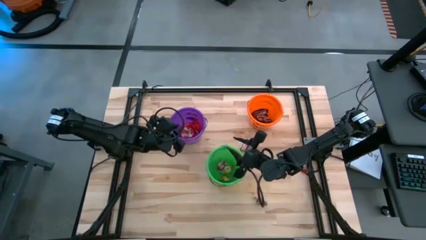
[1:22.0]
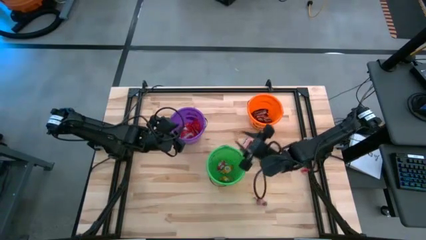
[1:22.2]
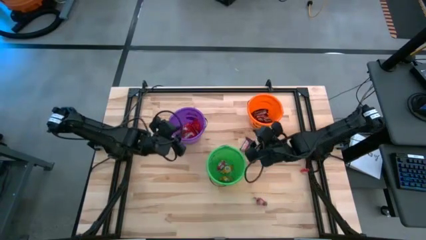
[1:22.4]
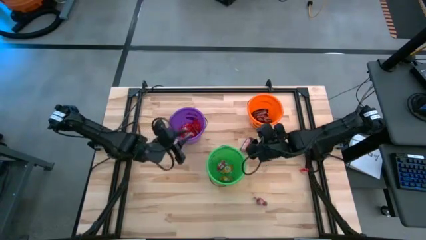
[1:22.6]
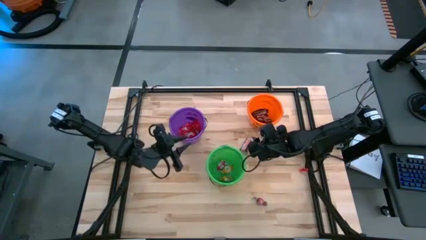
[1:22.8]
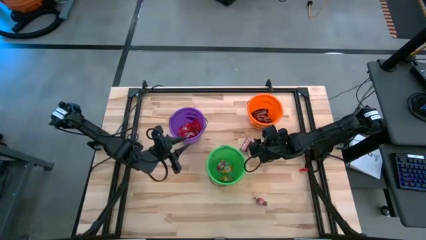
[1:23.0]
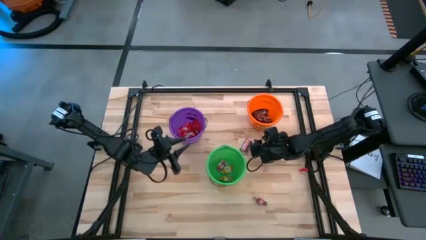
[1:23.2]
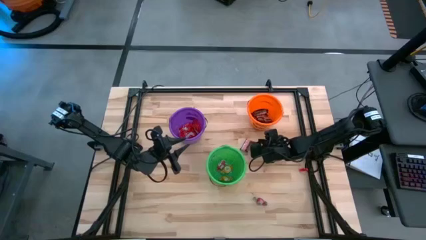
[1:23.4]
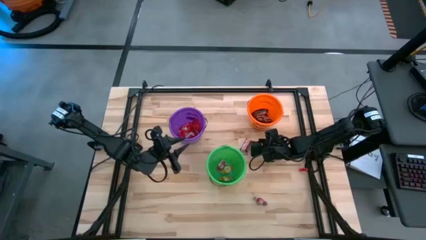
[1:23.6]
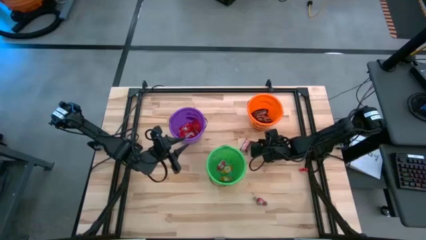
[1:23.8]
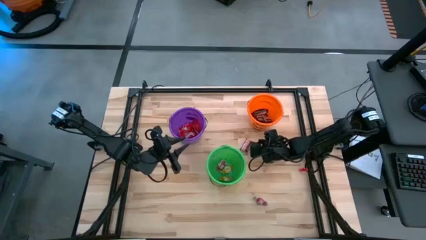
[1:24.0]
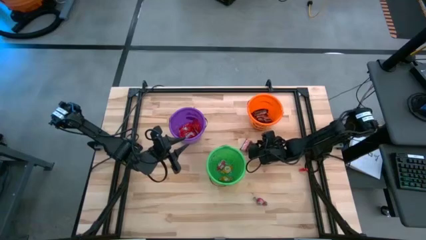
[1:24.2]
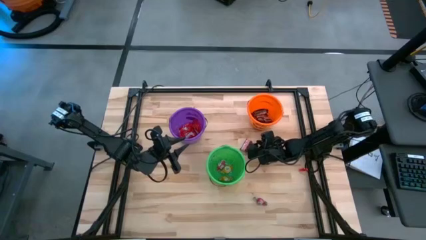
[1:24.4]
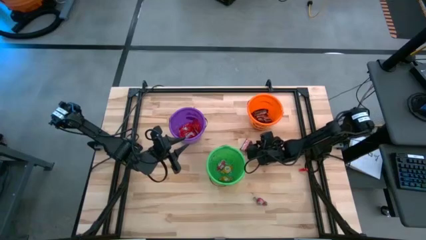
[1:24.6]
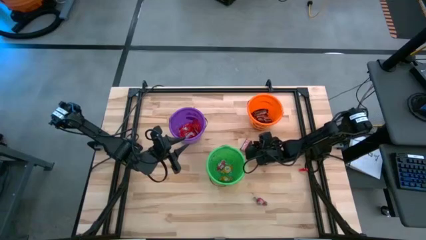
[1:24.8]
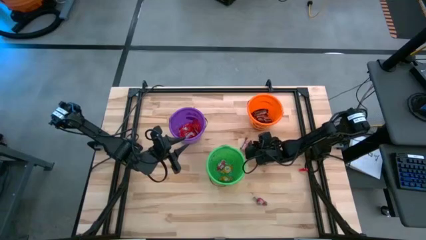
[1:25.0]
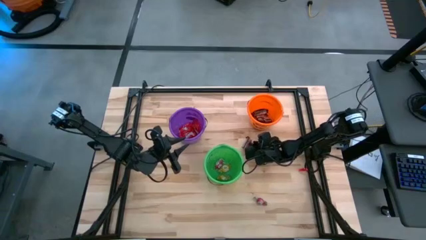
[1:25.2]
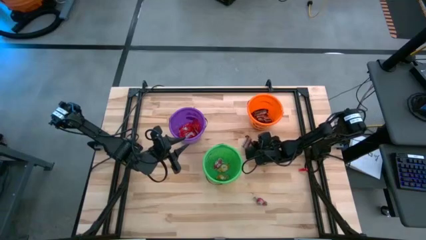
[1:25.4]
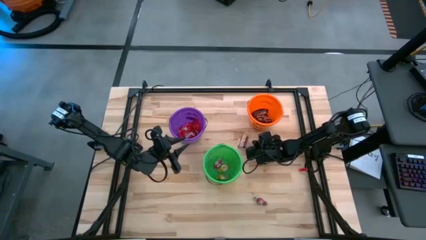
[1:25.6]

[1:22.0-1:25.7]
Task: Organize candy in baskets
Put the brown chocolate bar into the orange bucket

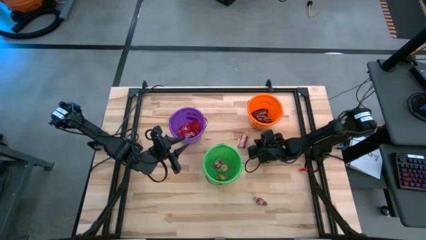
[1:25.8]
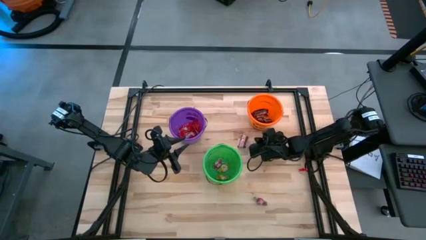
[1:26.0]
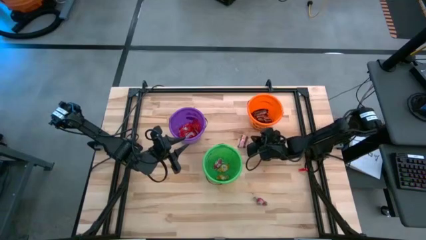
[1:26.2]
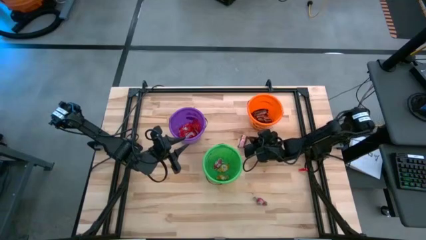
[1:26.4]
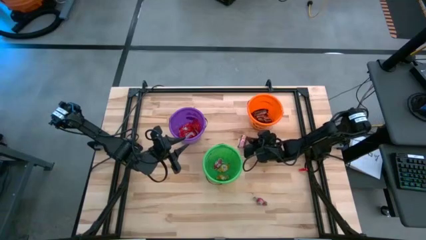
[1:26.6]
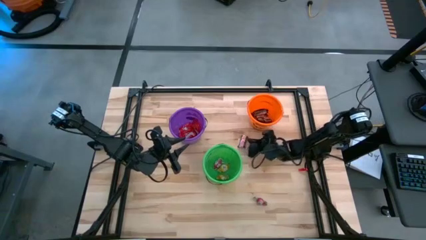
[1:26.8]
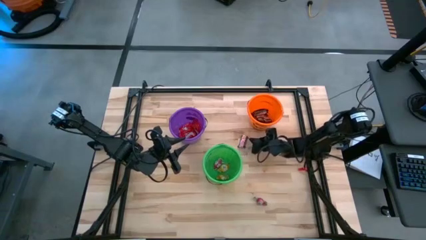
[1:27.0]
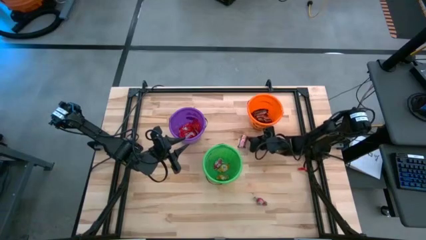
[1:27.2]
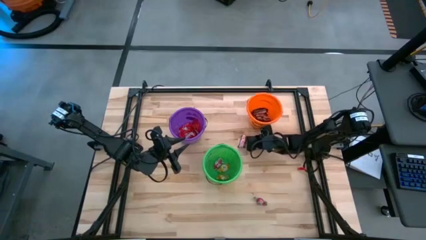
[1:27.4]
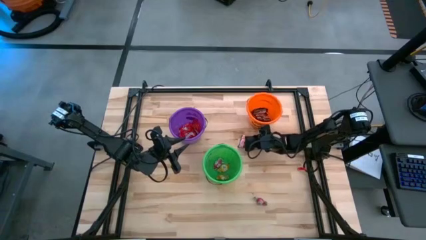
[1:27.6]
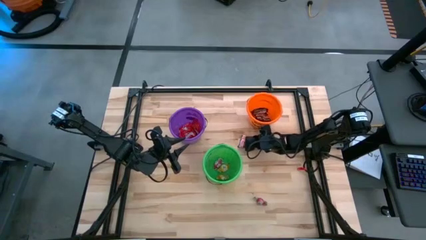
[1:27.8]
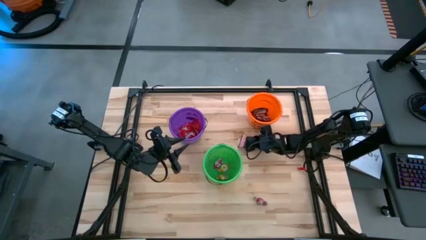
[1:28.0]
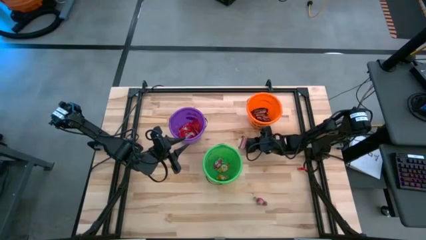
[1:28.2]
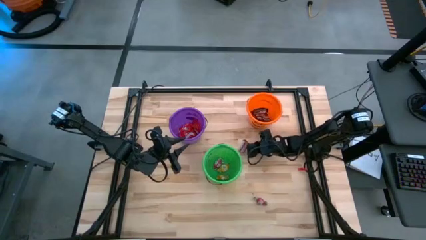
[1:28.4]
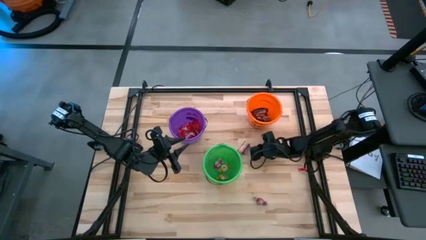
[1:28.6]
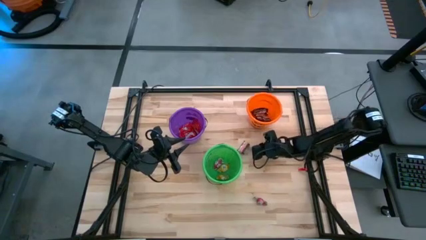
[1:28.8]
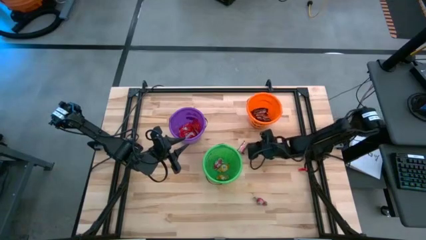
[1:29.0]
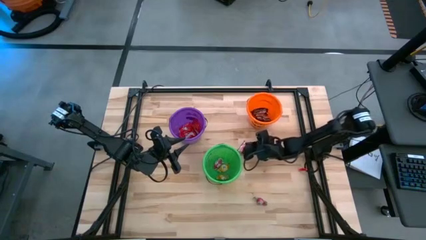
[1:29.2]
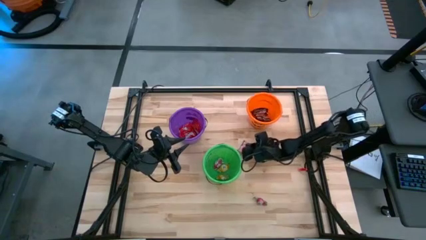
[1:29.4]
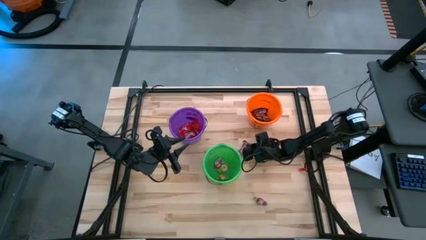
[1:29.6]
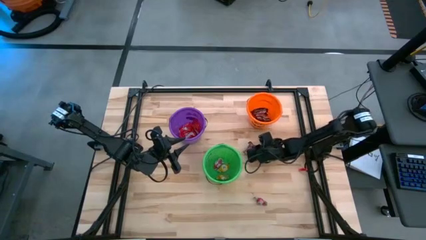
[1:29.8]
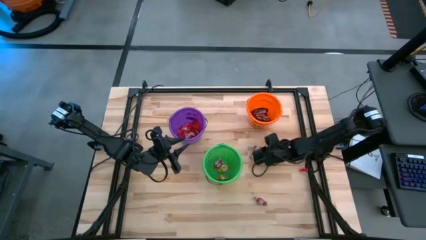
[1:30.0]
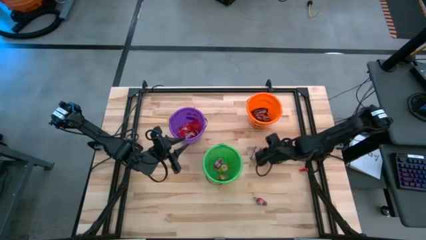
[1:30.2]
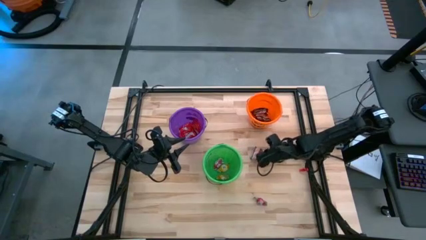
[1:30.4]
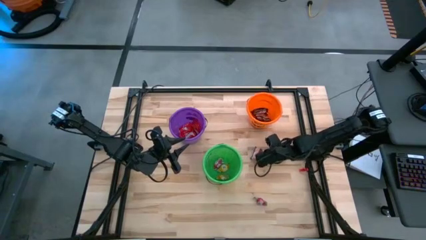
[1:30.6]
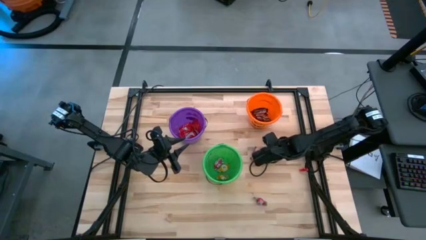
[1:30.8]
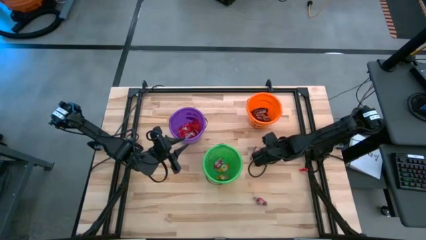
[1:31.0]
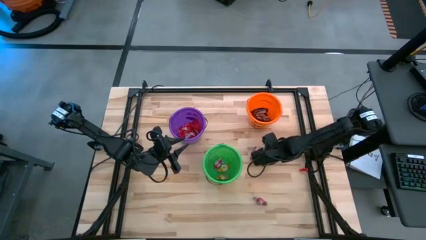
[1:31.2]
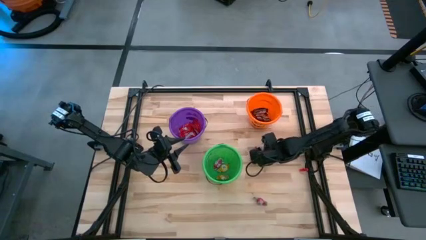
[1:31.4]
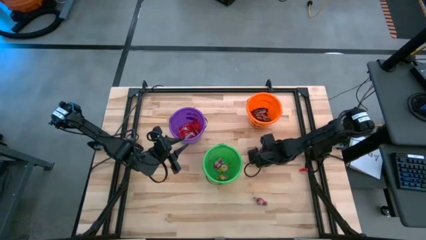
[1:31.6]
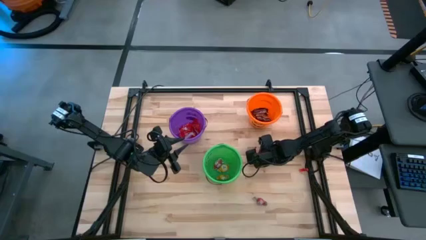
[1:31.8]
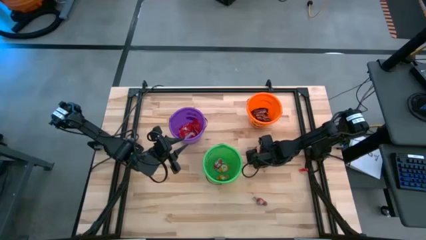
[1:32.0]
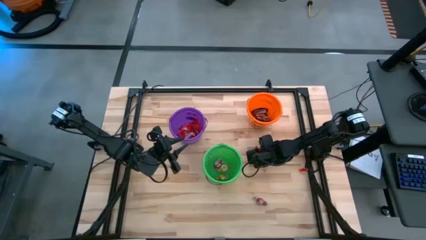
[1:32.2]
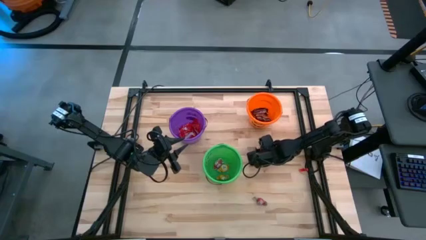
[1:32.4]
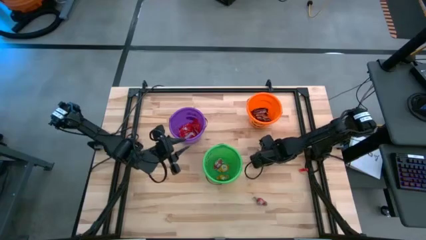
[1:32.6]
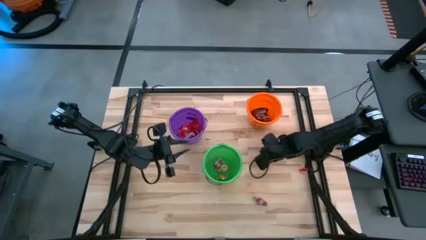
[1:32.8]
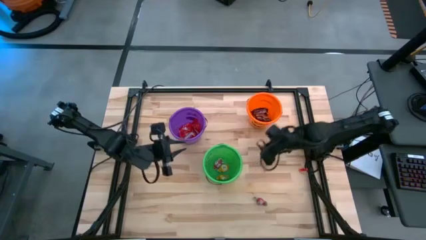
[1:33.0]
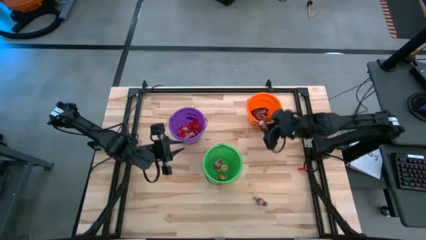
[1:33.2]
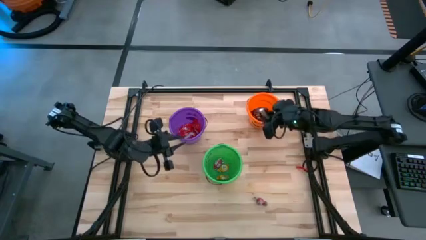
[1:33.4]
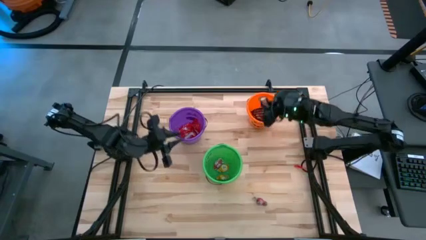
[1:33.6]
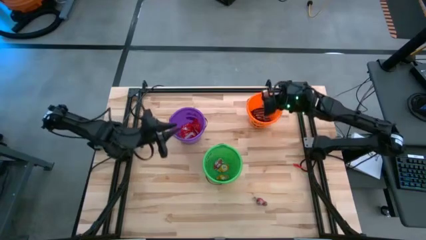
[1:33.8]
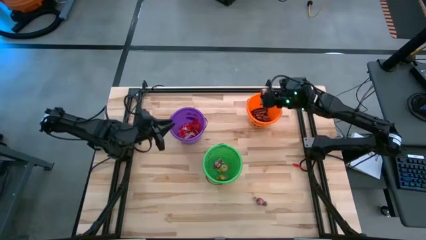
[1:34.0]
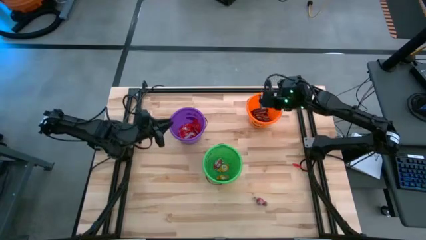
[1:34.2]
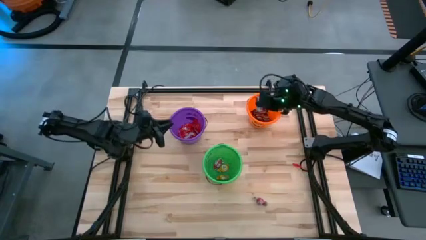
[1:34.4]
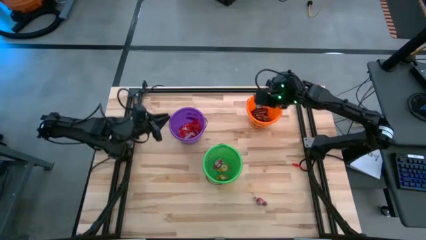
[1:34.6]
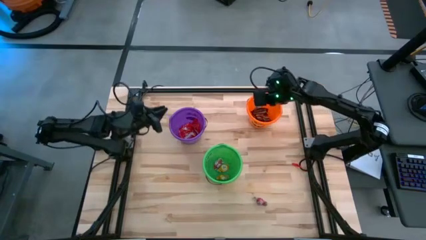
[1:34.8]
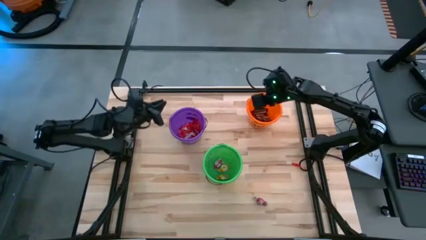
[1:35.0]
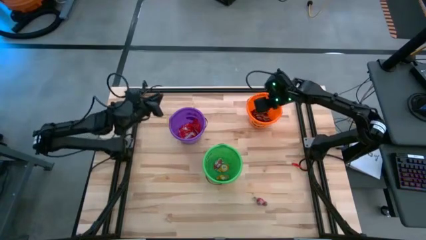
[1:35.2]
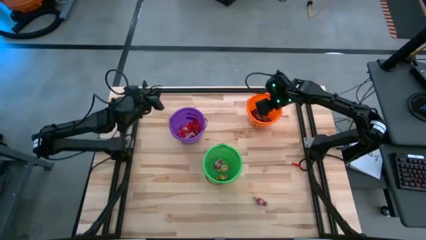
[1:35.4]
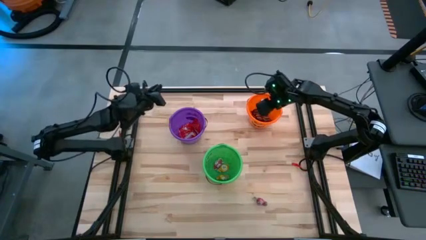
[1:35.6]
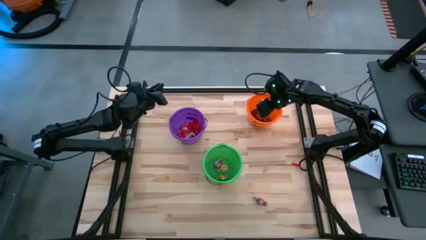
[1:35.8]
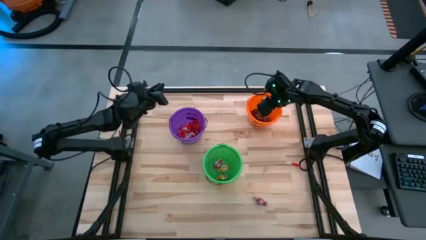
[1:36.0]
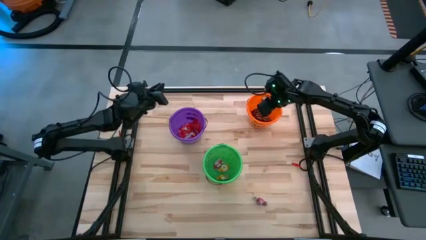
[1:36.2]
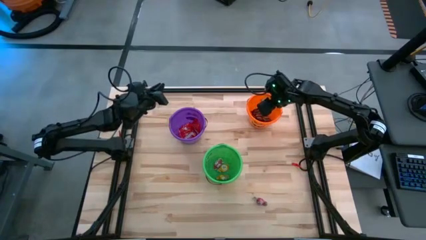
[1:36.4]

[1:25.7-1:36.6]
Put the brown chocolate bar into the orange bucket
